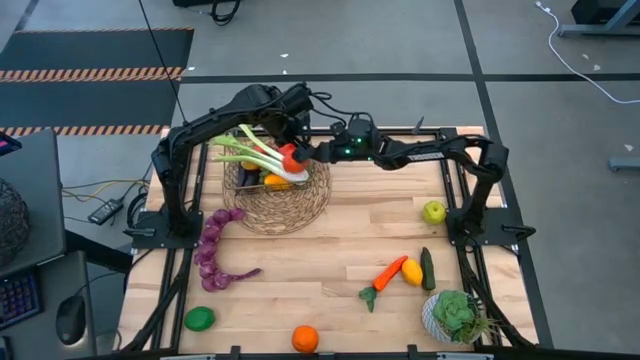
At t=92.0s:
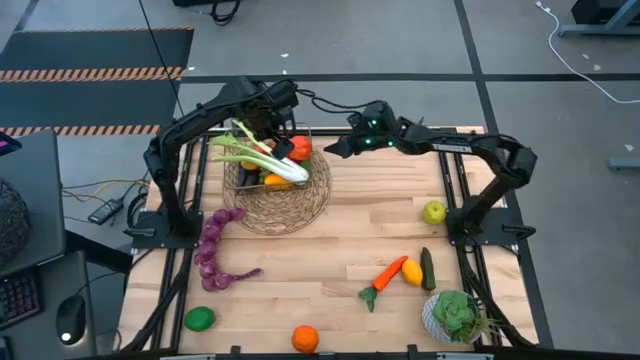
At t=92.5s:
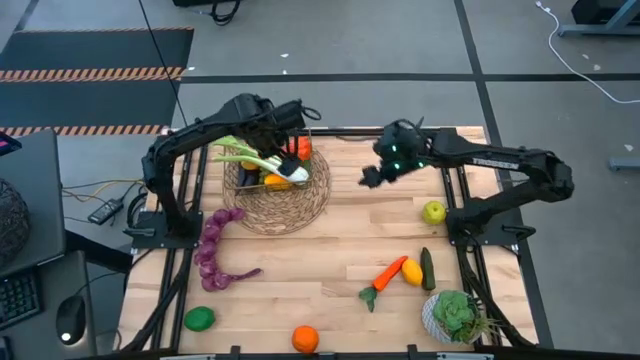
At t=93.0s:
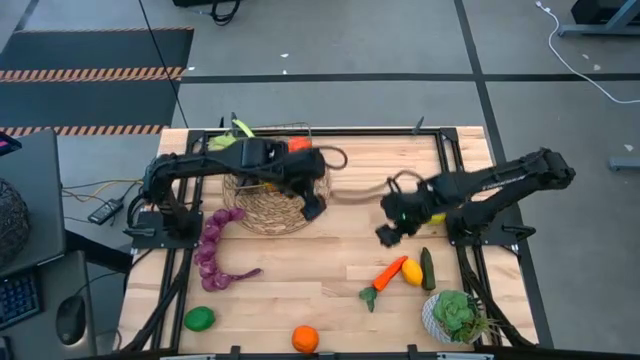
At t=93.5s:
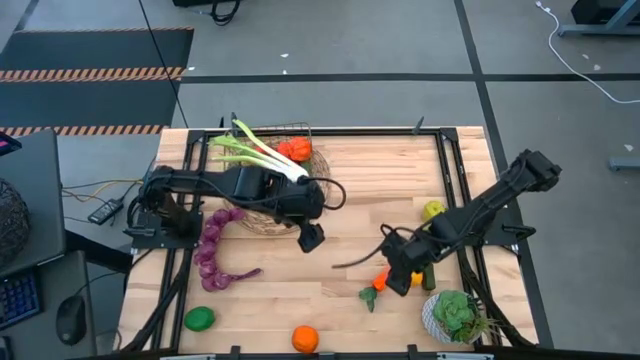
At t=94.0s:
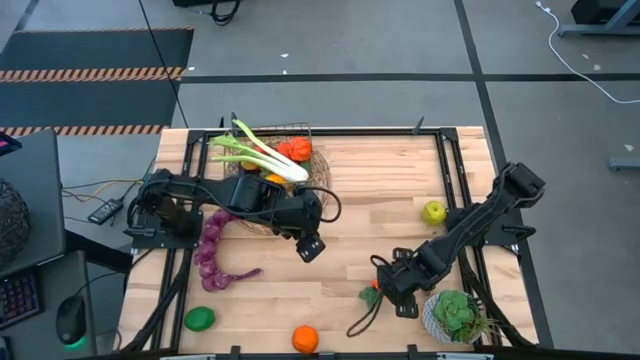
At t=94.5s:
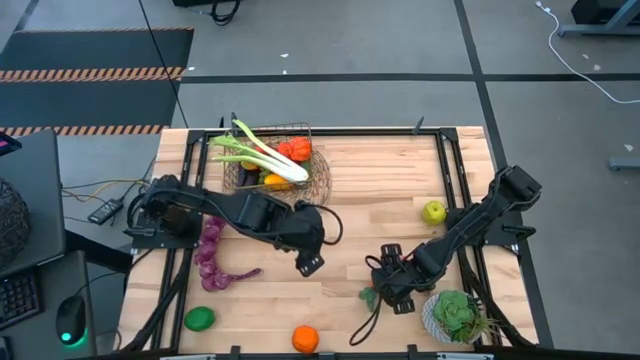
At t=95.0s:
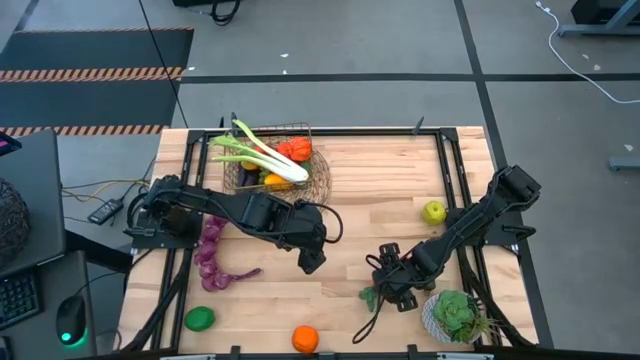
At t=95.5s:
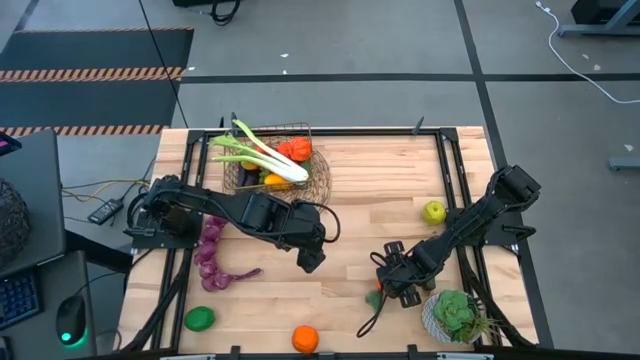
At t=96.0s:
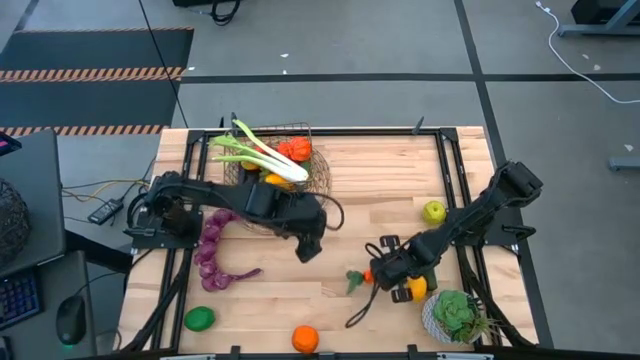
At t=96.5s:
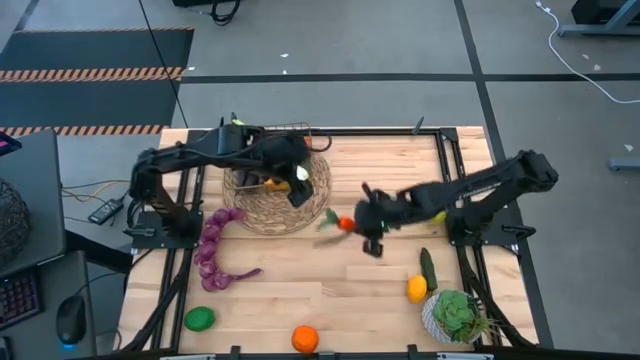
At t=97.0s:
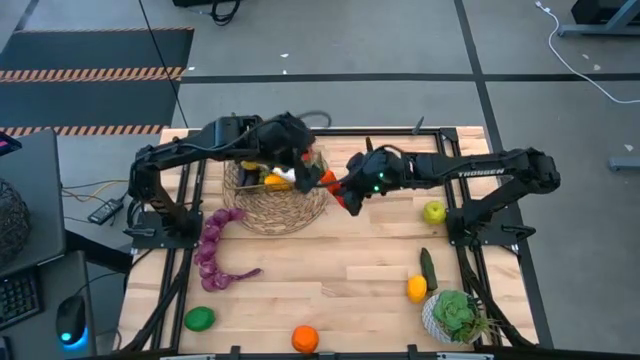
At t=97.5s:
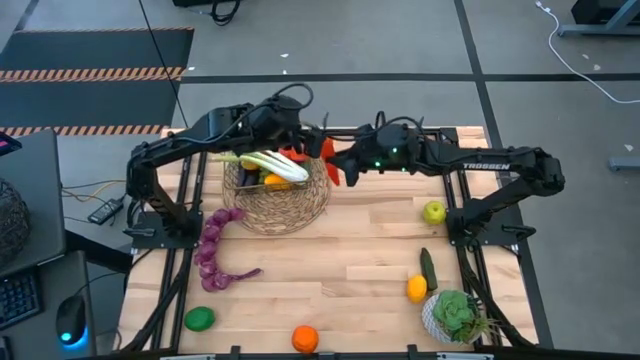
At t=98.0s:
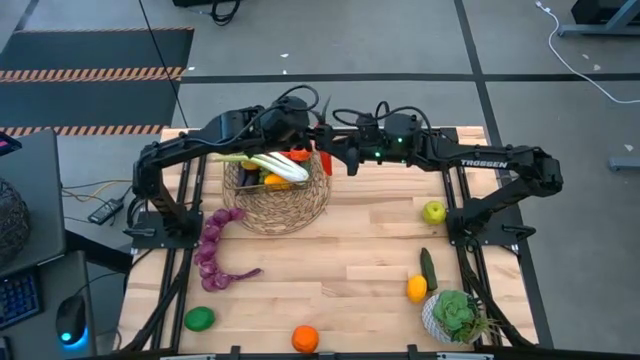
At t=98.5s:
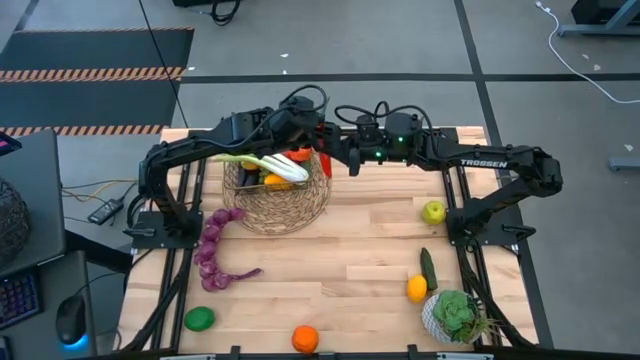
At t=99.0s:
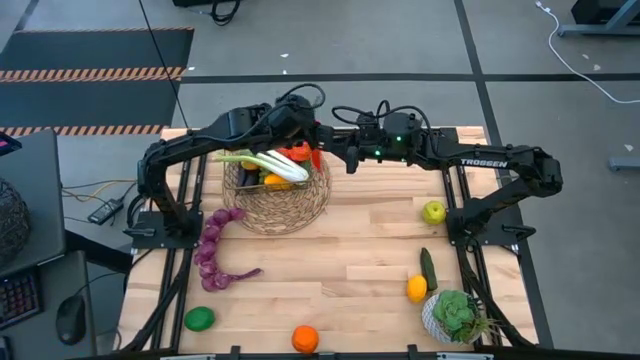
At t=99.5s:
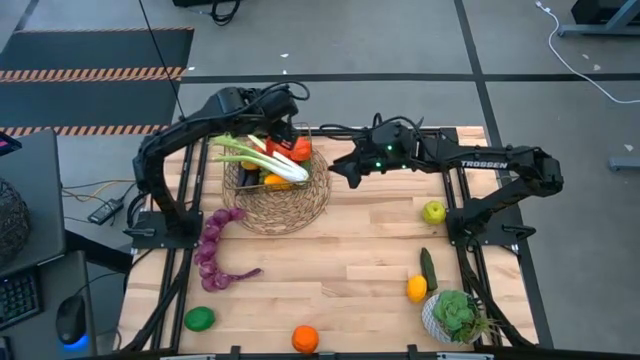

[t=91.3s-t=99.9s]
Task: Build produce basket
Put the orange carrot into the wire basket

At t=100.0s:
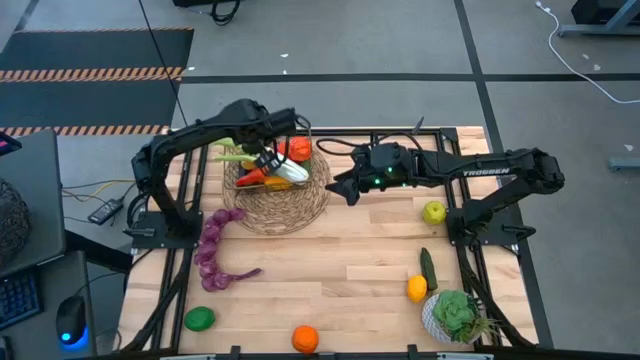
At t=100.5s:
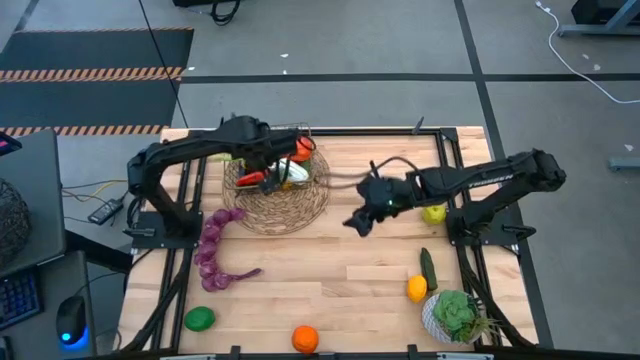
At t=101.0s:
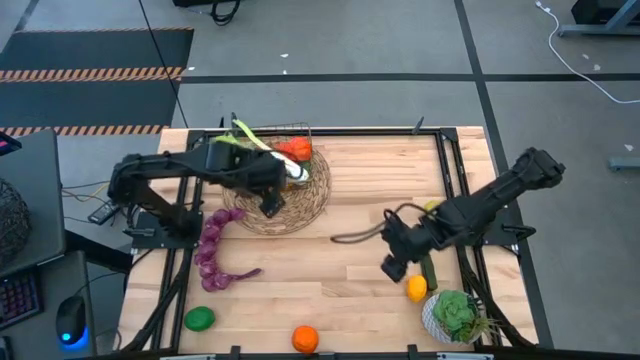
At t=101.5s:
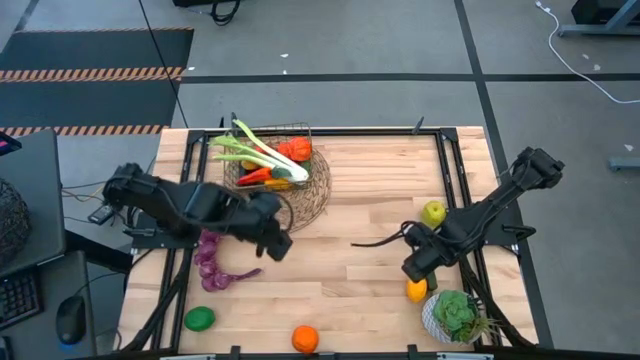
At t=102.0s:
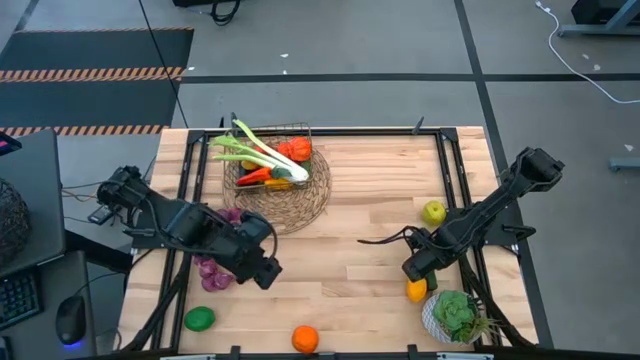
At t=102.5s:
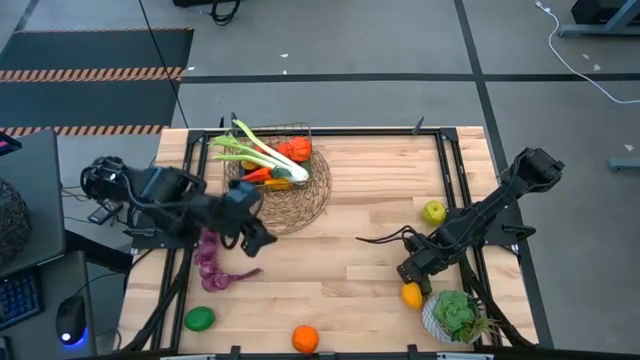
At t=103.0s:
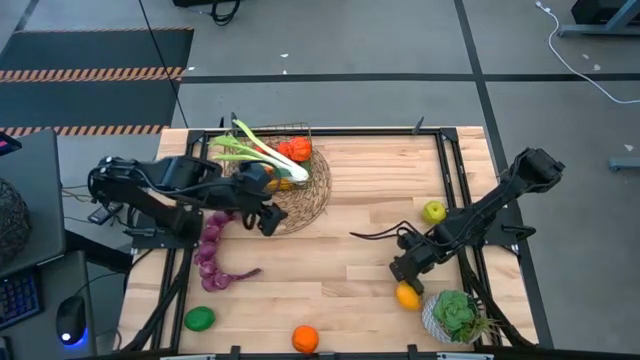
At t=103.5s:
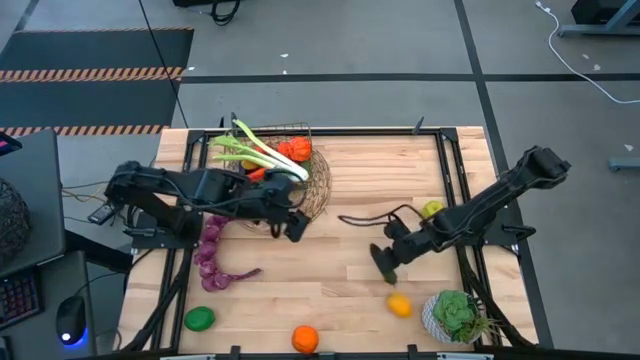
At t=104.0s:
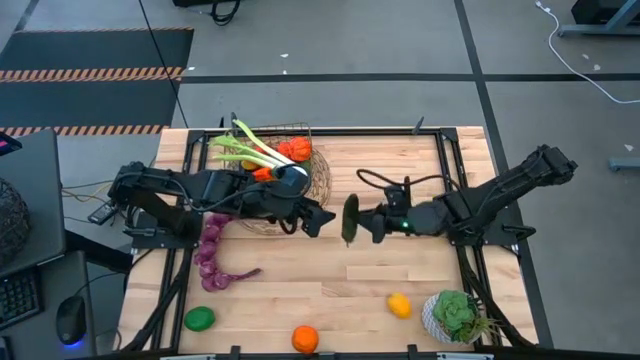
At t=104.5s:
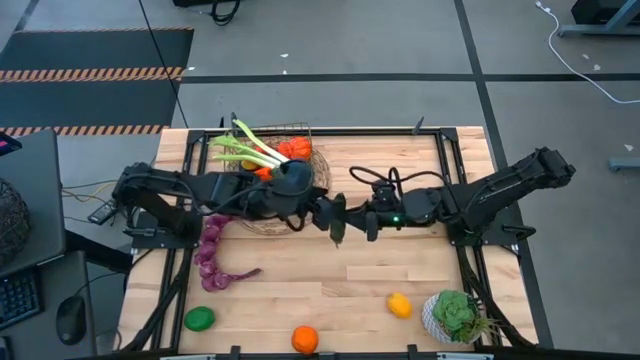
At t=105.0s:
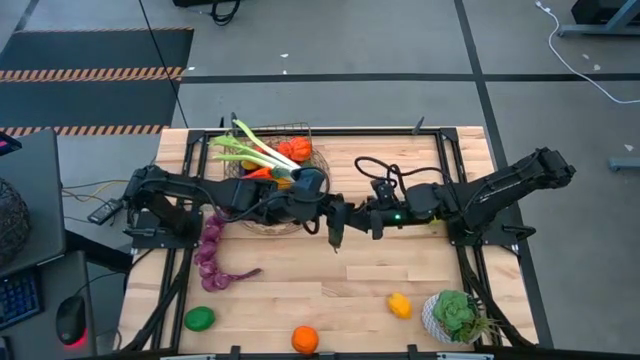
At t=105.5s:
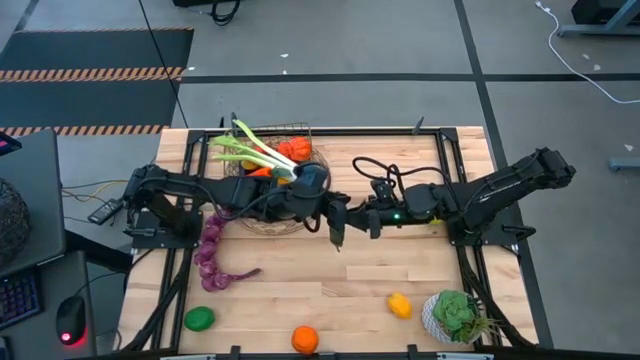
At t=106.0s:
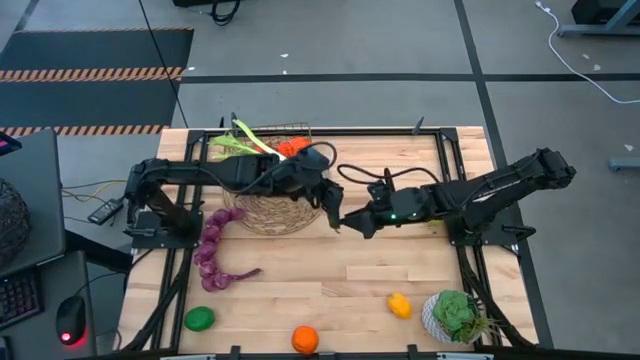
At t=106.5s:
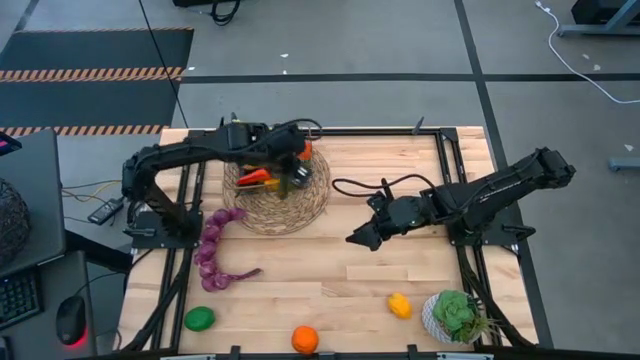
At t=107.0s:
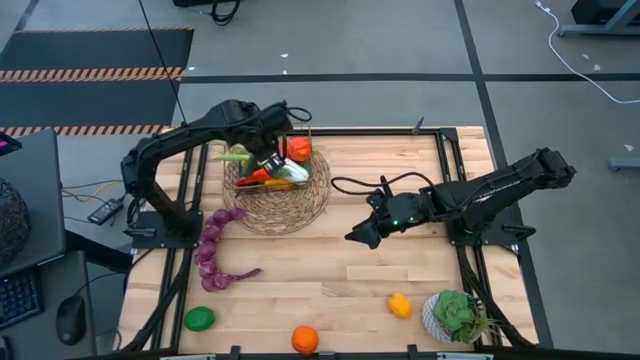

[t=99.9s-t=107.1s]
Put the green cucumber into the wire basket

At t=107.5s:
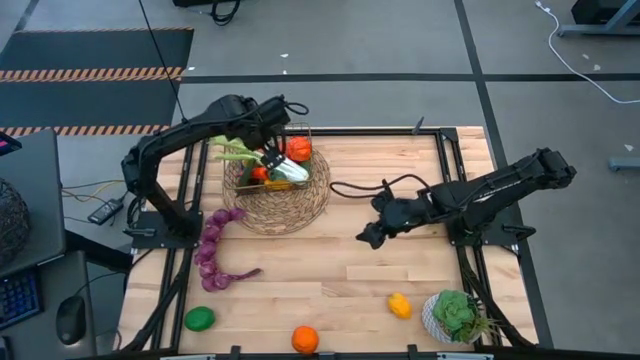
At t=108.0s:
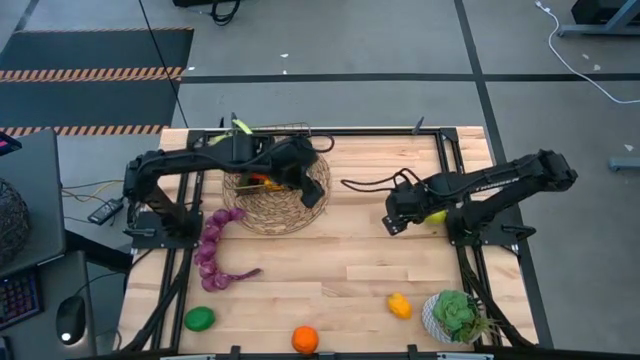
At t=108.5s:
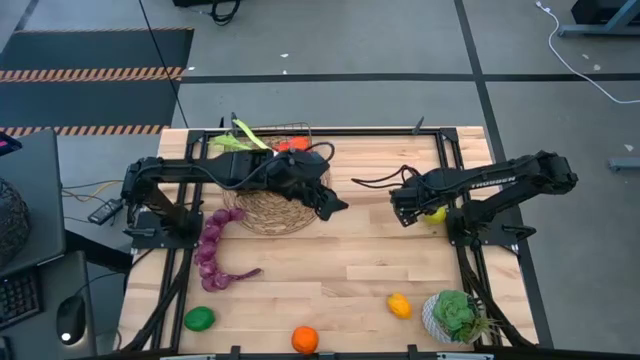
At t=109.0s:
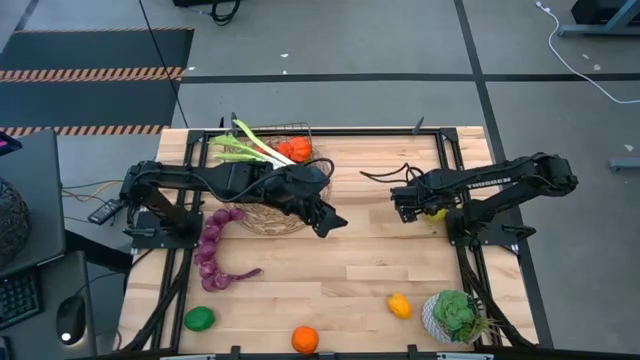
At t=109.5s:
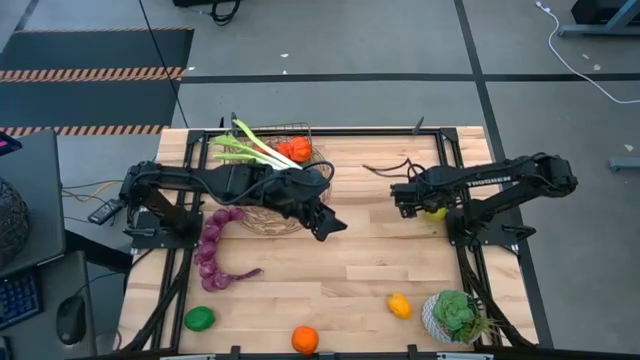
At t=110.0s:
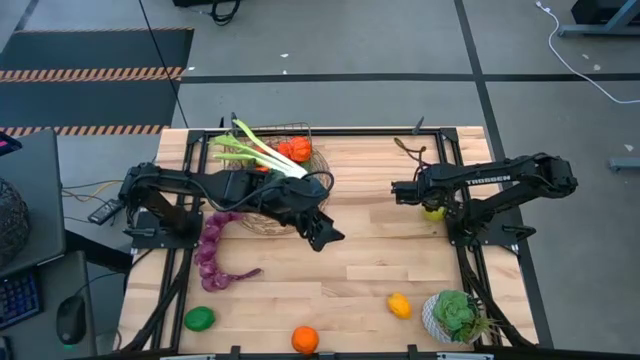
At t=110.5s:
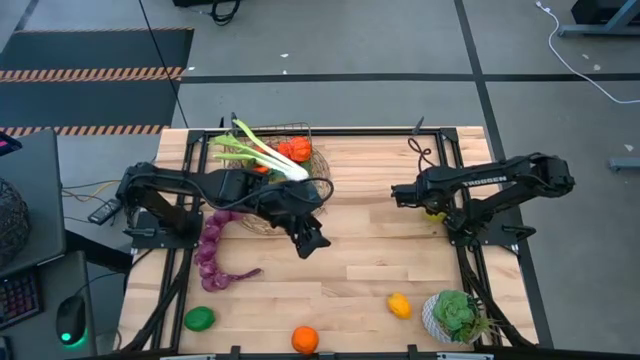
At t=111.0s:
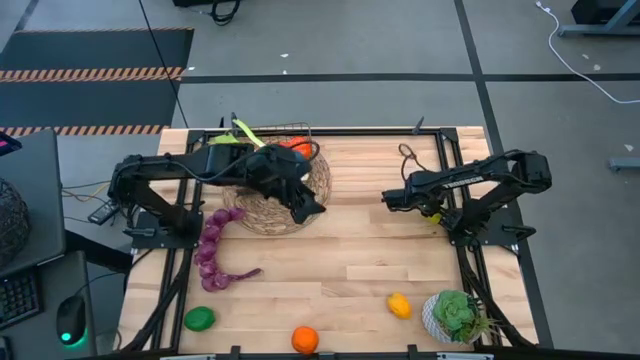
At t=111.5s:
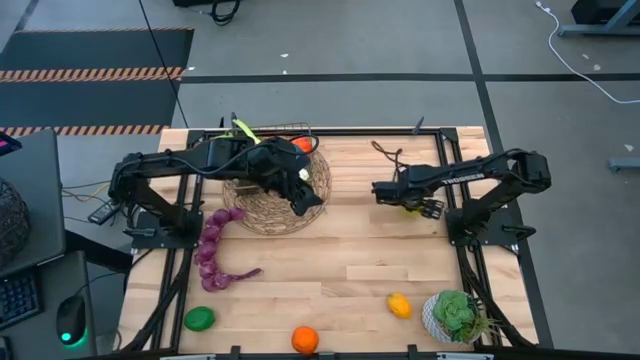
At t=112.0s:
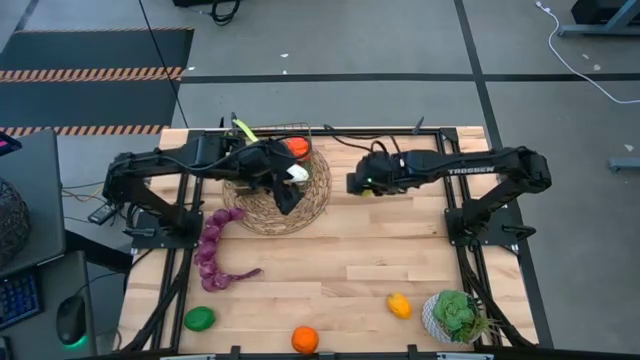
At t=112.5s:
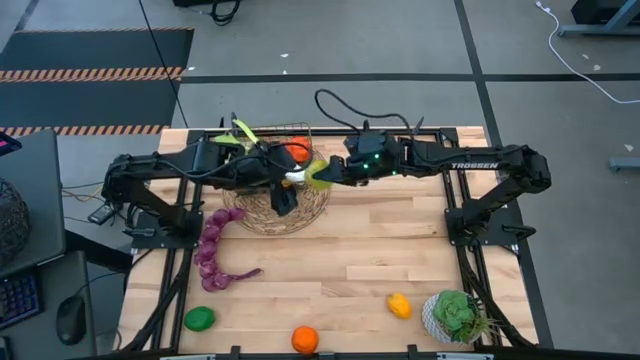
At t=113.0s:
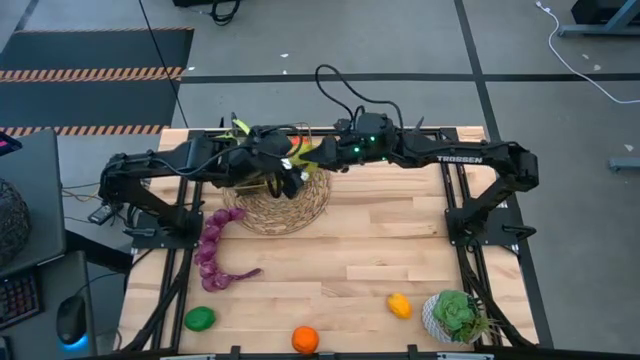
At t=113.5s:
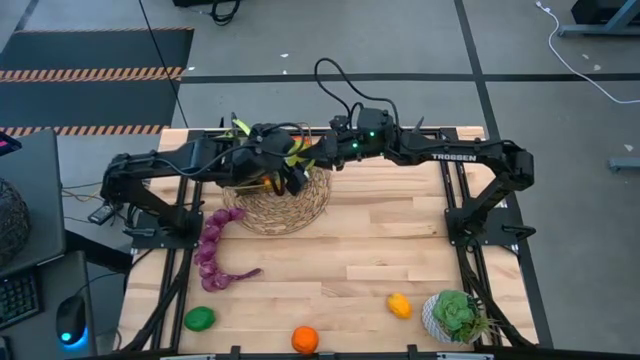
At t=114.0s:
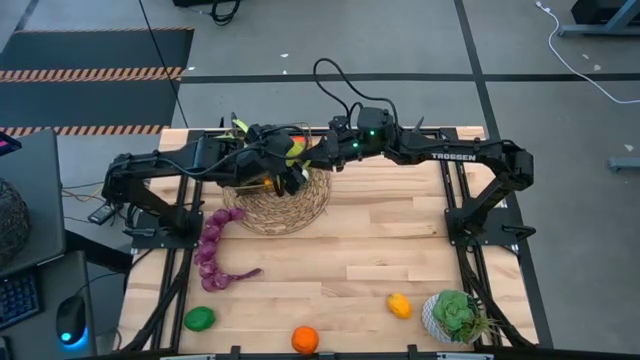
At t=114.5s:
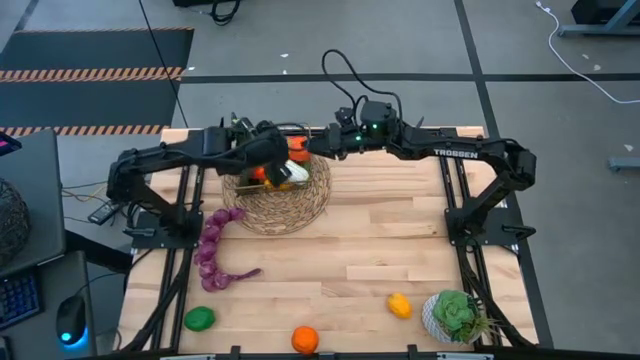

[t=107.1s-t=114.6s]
Put the green apple into the wire basket
